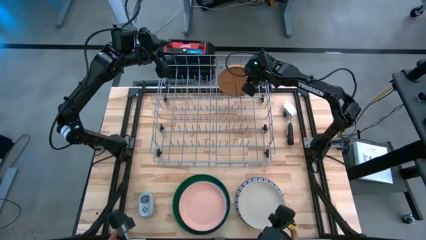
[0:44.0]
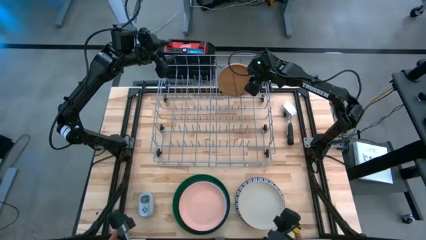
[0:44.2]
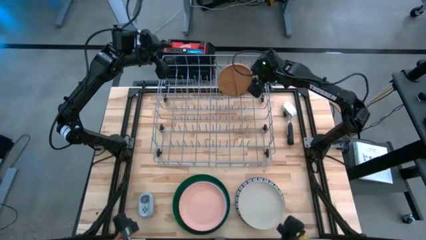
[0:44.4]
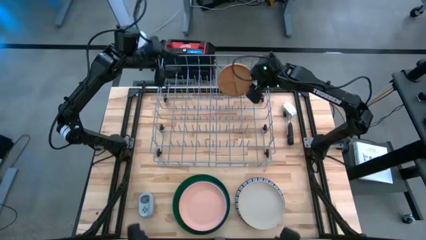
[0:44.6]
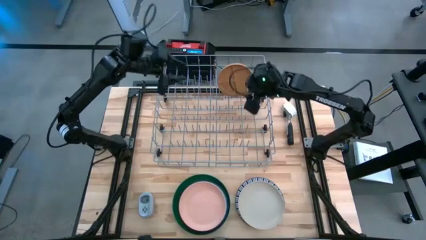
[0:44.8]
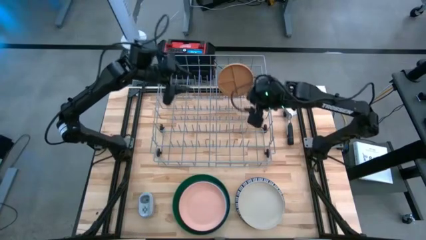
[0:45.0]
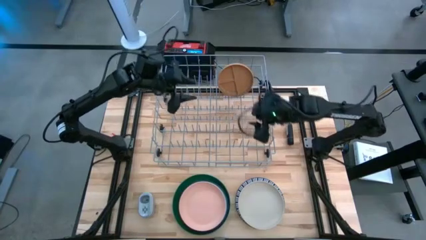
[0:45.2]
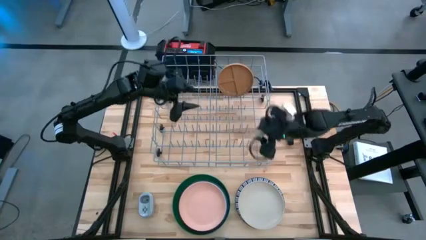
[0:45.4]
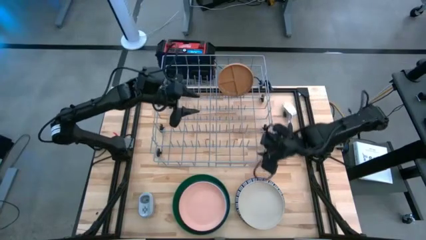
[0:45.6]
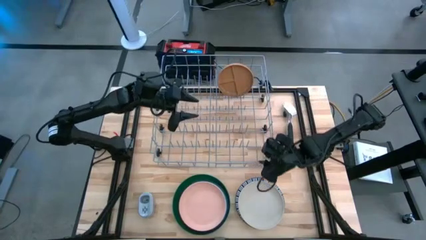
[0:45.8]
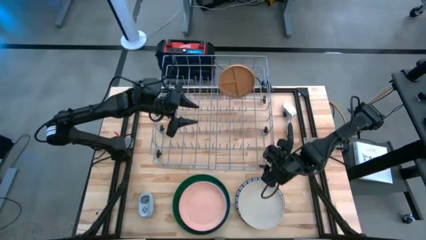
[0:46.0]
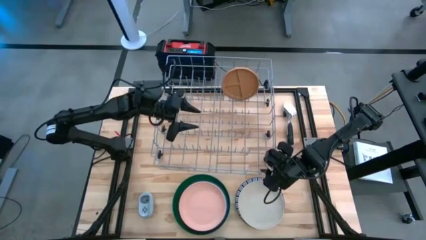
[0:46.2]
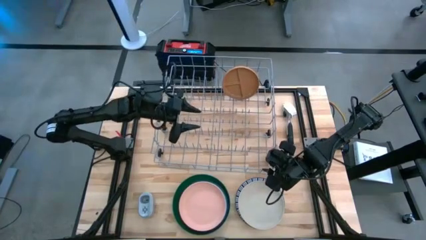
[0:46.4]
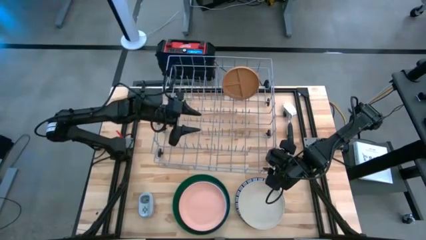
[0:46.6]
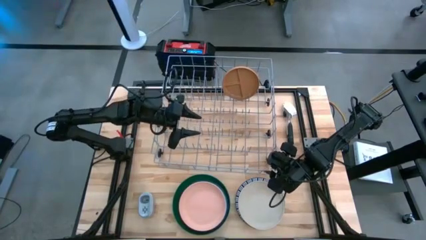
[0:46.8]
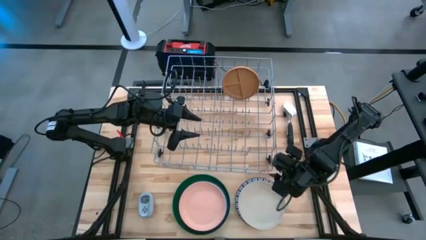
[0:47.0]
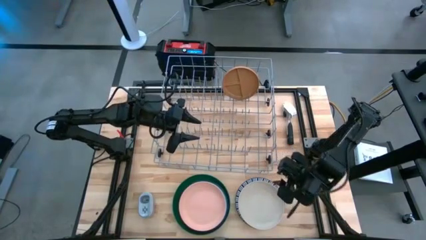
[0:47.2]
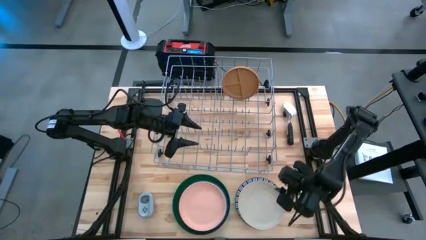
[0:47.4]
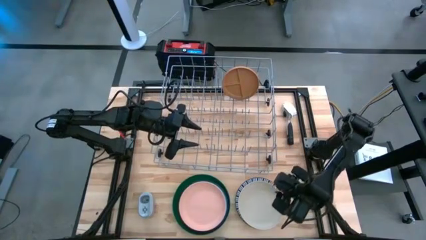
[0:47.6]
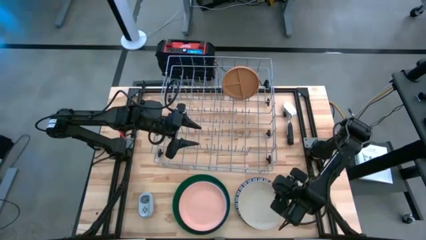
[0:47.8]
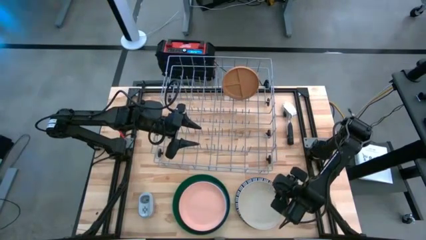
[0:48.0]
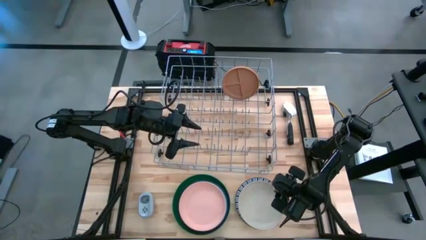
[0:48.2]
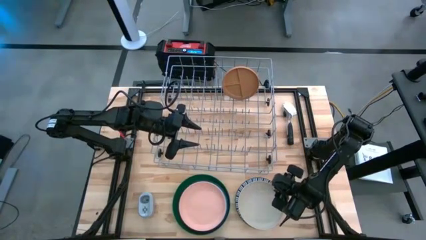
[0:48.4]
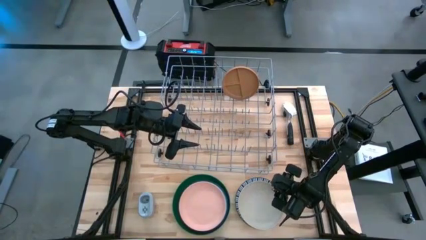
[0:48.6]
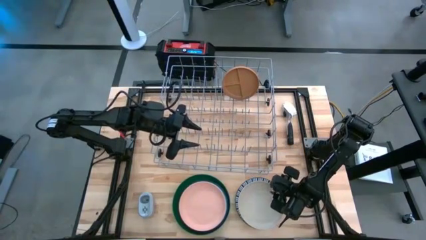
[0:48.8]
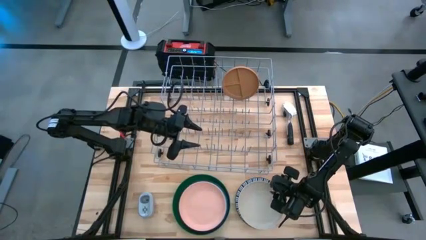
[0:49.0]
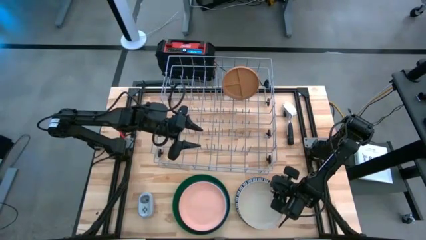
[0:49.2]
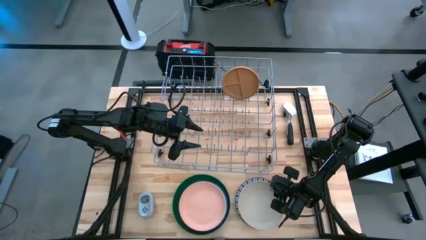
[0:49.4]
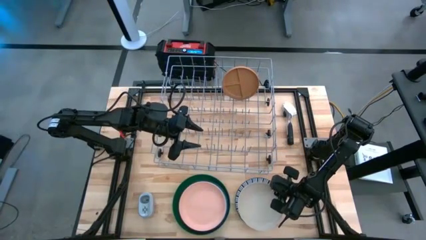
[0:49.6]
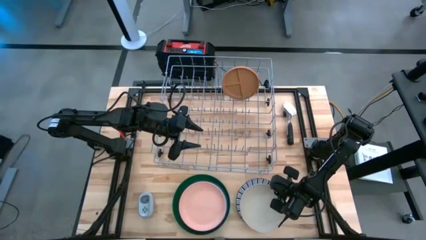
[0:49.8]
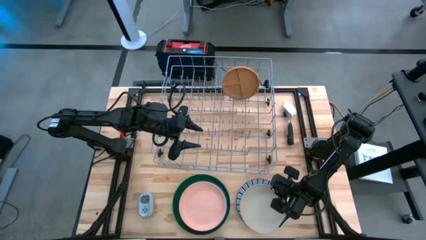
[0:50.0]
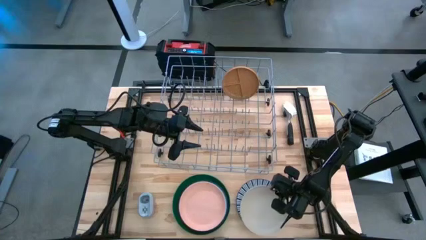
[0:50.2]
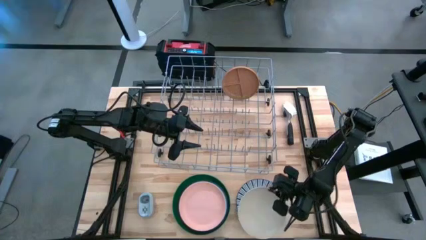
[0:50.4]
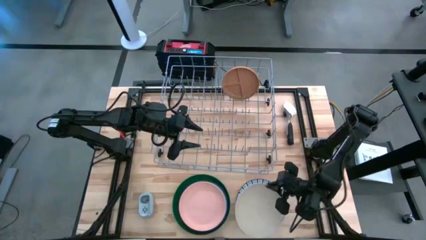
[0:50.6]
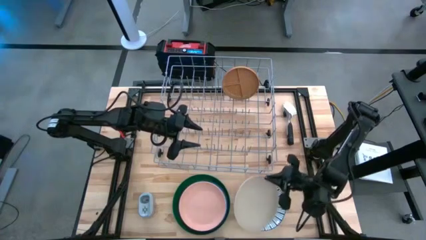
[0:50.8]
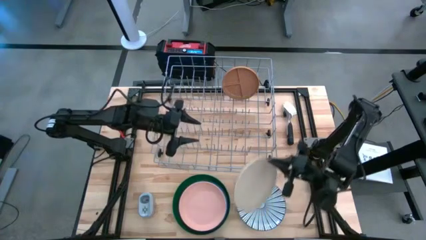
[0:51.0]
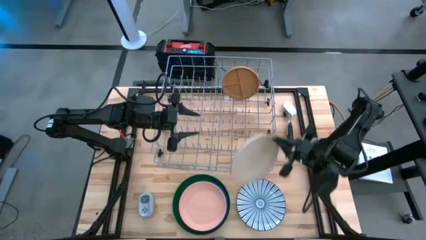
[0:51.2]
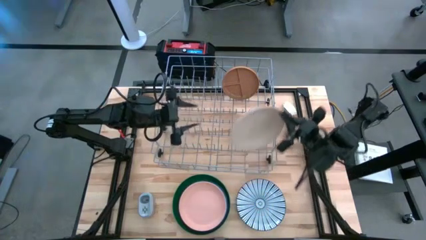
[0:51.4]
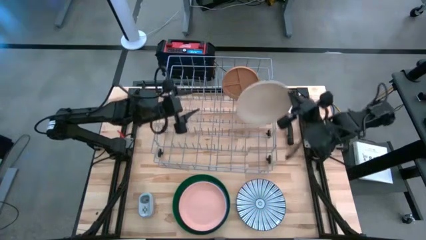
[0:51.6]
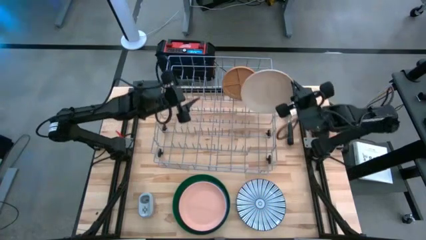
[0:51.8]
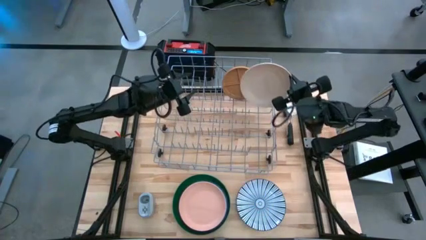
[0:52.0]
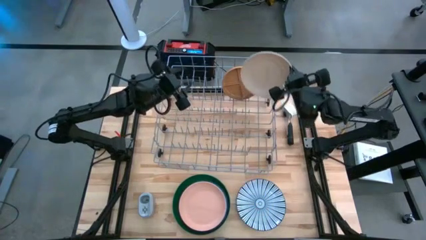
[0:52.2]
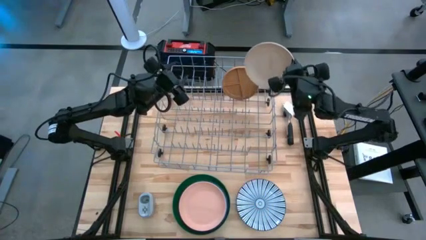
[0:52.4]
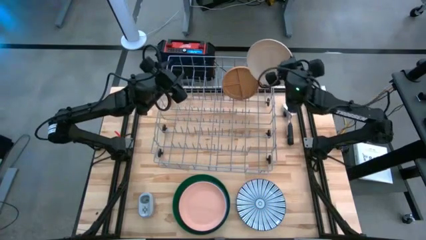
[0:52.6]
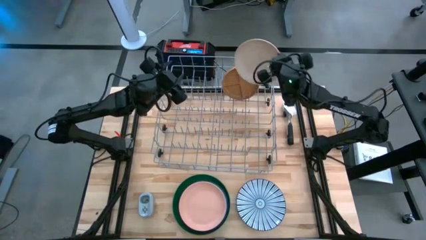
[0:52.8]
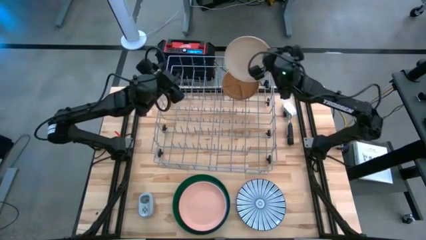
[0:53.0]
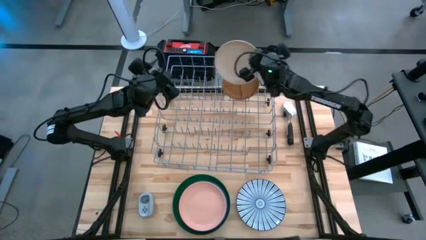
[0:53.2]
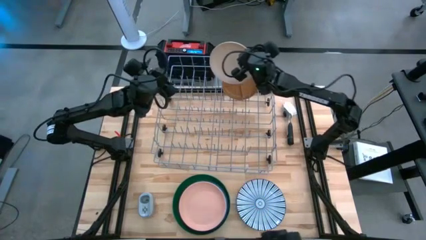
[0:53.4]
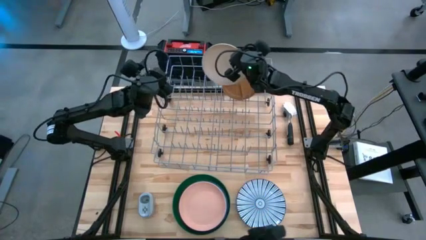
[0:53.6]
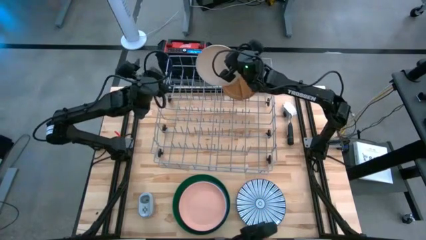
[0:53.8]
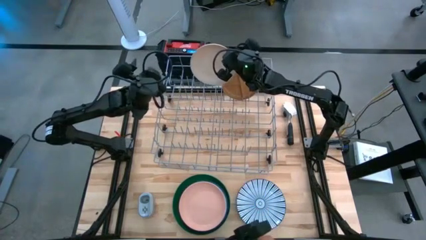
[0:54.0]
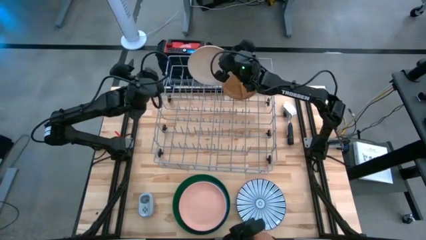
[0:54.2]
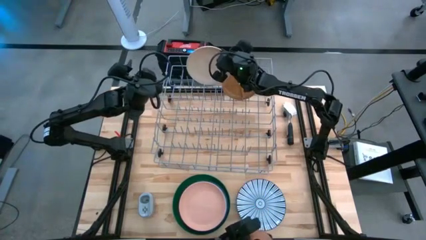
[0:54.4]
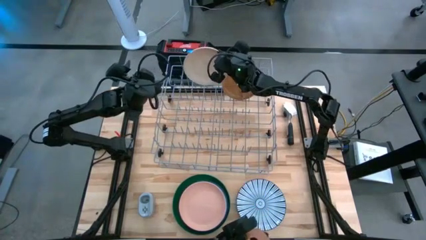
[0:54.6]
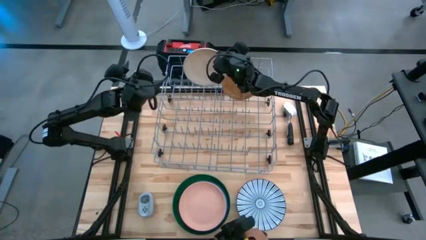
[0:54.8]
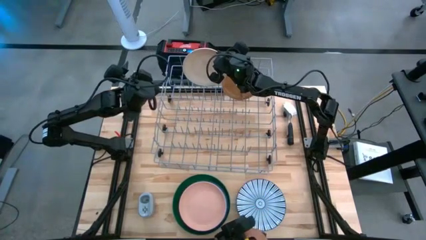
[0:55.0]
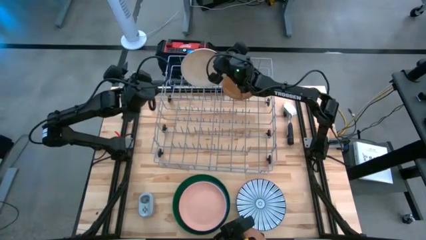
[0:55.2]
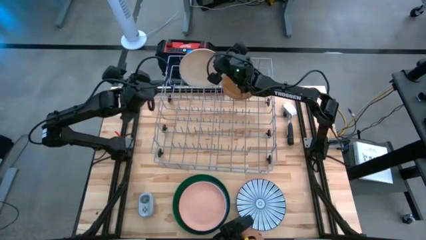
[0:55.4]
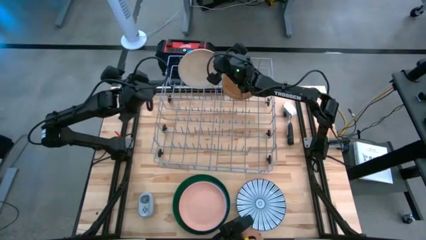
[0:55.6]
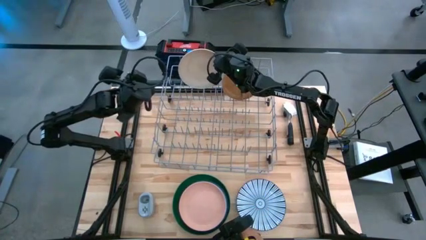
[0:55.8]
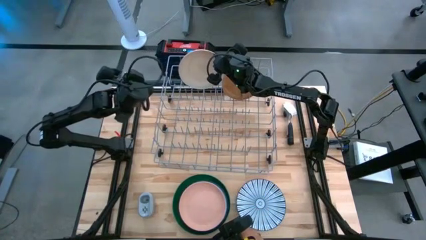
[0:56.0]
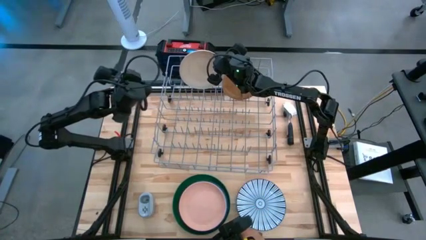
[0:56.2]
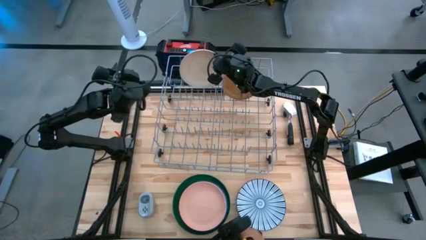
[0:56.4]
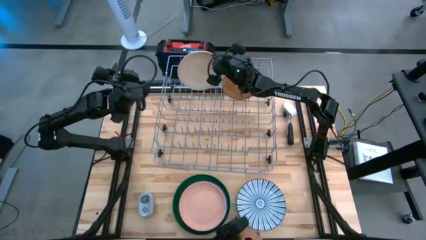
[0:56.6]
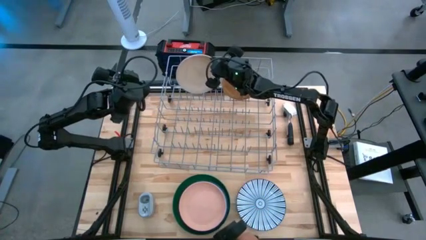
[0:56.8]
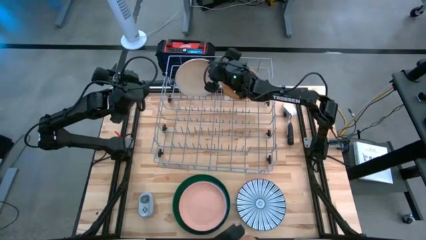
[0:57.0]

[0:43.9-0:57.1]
Task: Sort dishes
Put the white plate into the dish rack
